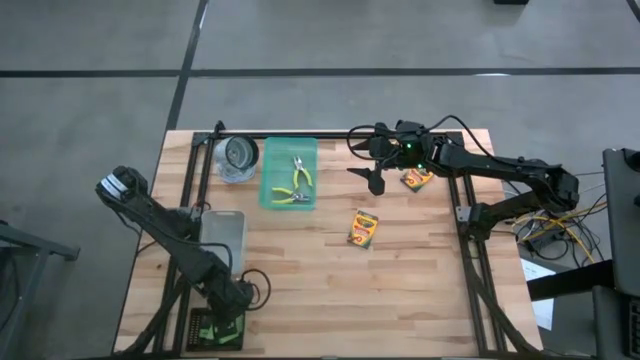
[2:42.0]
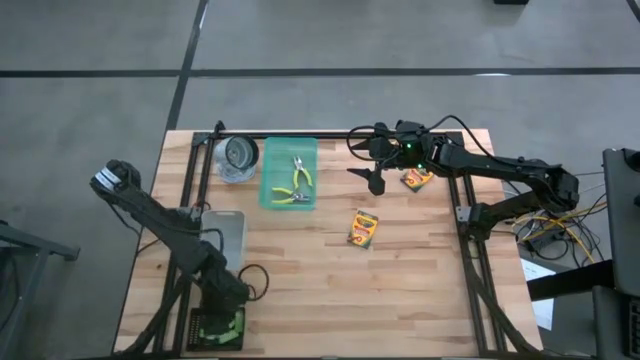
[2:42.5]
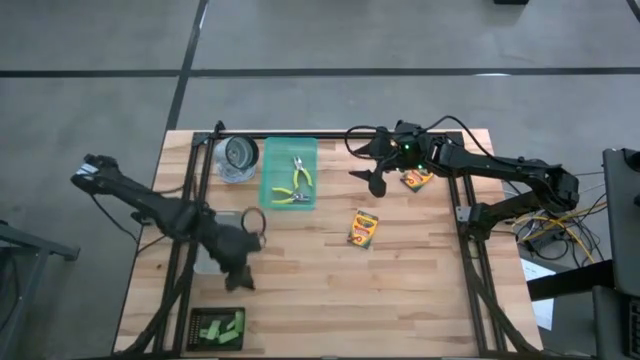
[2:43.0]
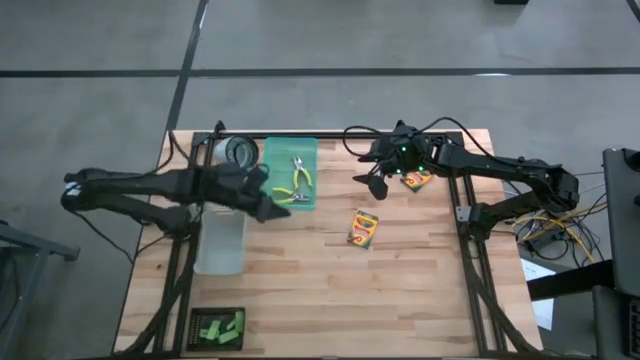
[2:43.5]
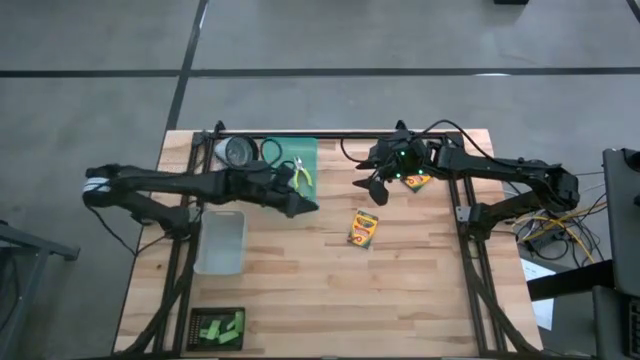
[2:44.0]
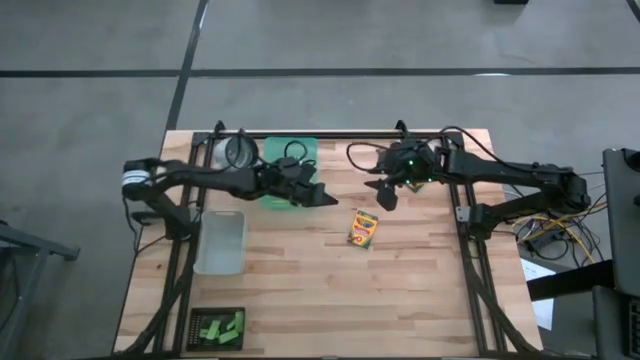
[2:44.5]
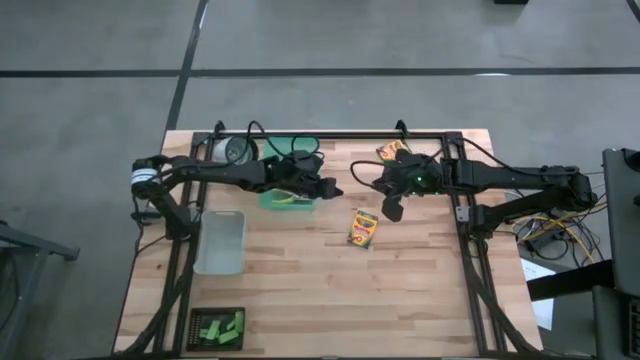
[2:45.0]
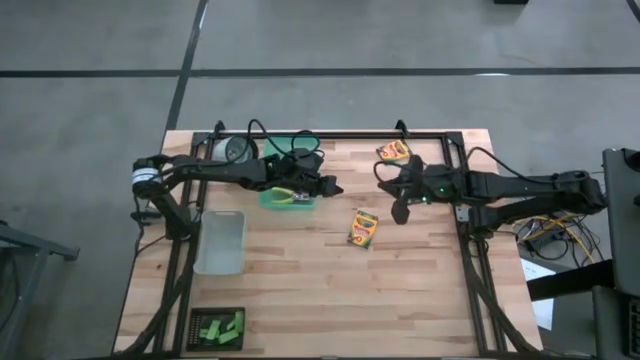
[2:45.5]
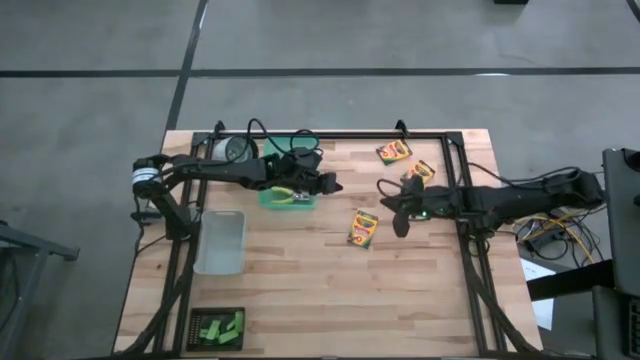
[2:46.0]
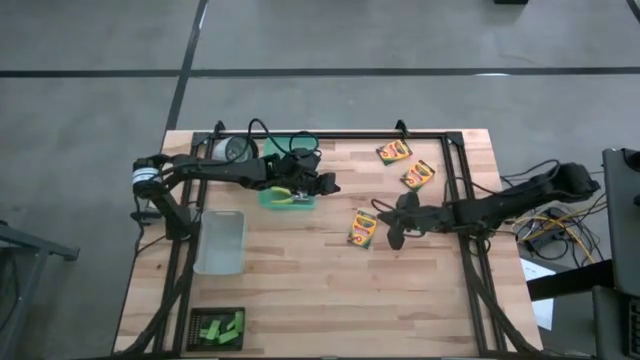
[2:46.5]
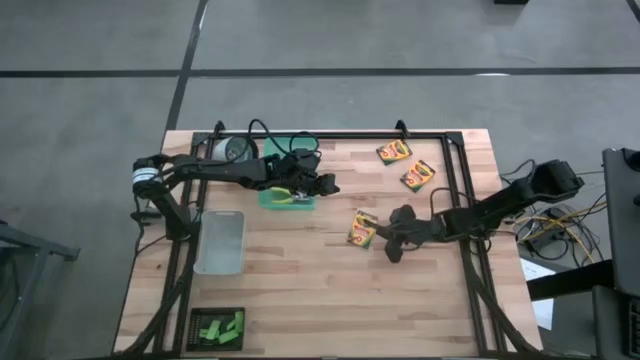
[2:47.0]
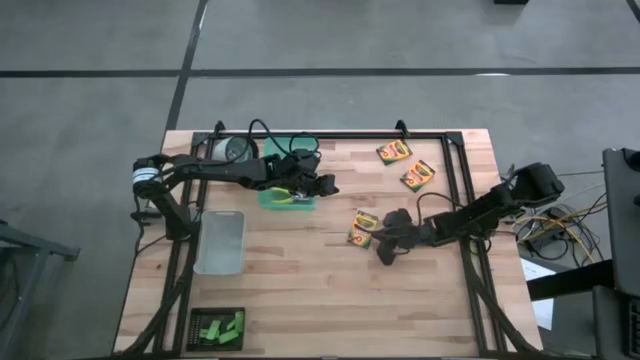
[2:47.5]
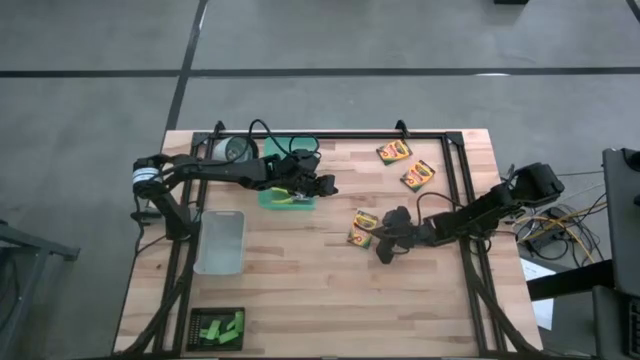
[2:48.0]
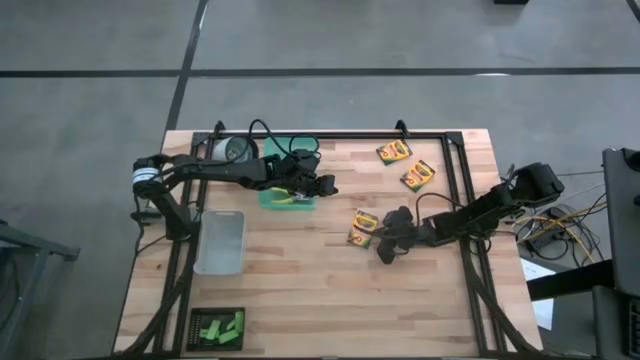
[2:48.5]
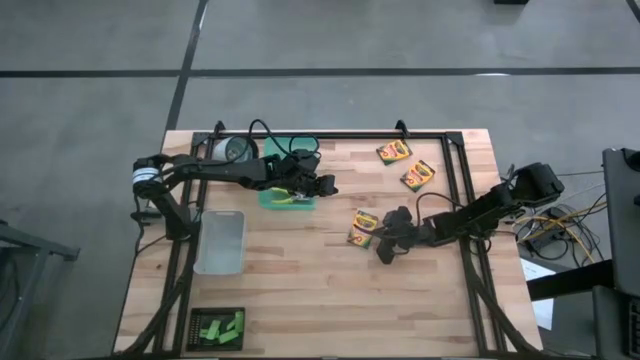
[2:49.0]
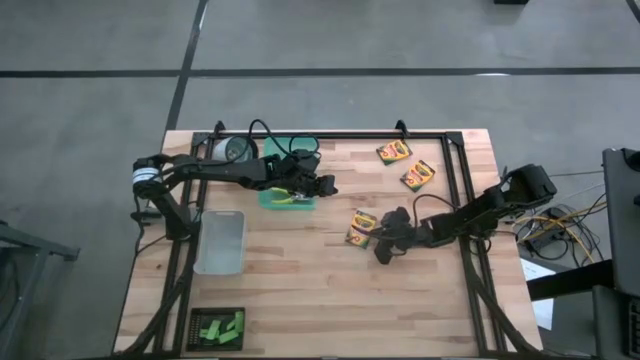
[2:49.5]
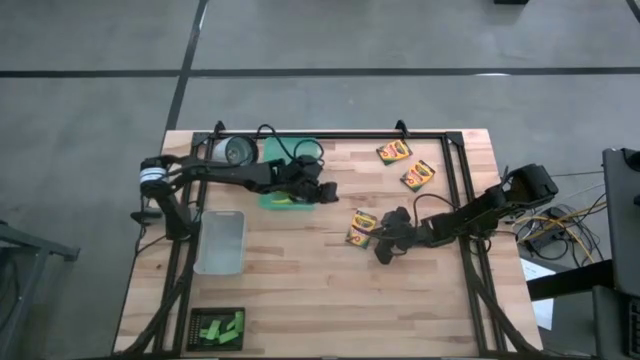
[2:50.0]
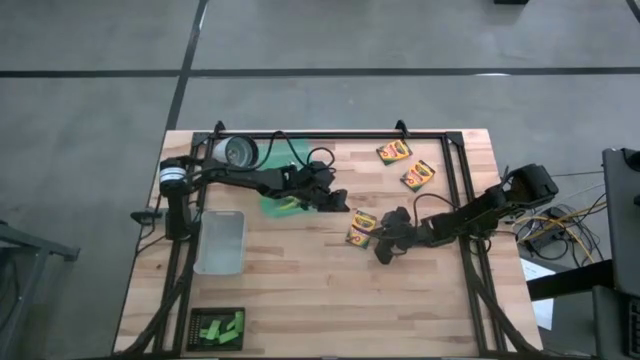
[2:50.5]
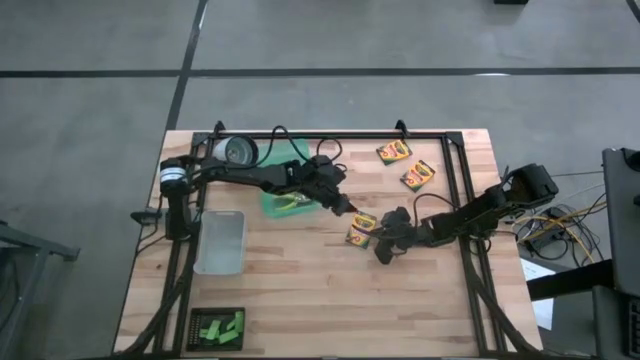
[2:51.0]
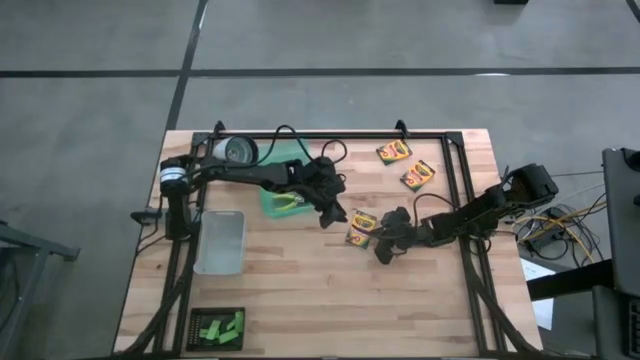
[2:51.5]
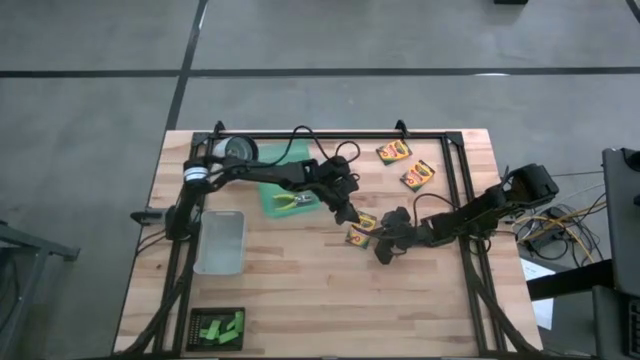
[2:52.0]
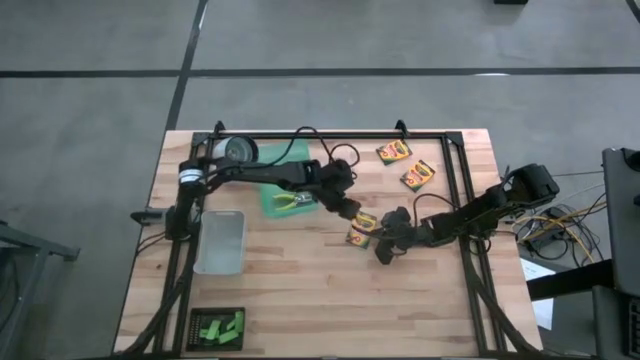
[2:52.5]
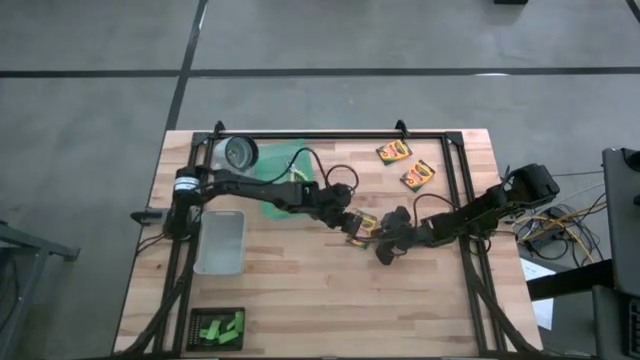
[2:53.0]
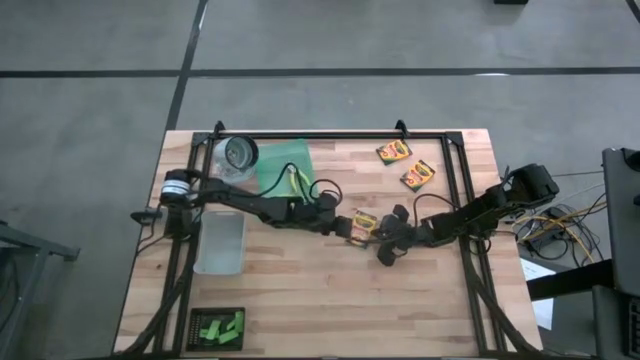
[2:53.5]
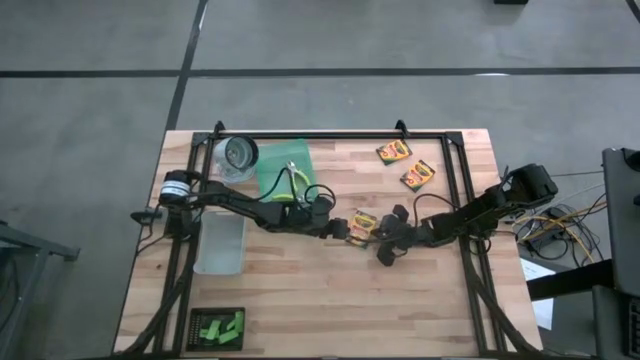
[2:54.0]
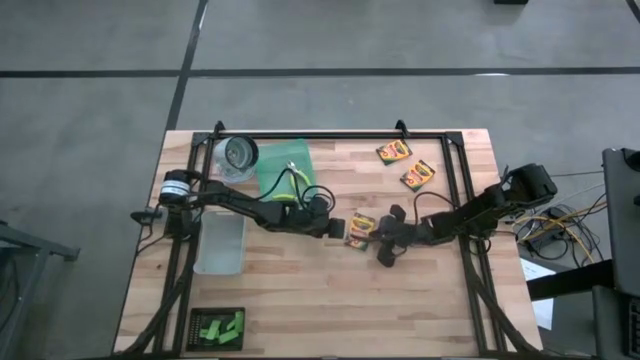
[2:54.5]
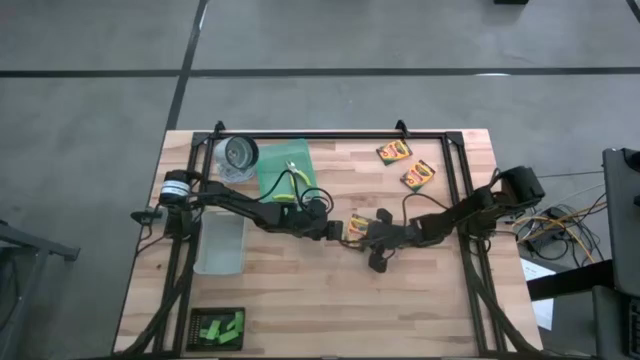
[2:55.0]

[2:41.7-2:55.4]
Task: Pick & Place School Supplies
Put the yellow crayon box into the gray bin

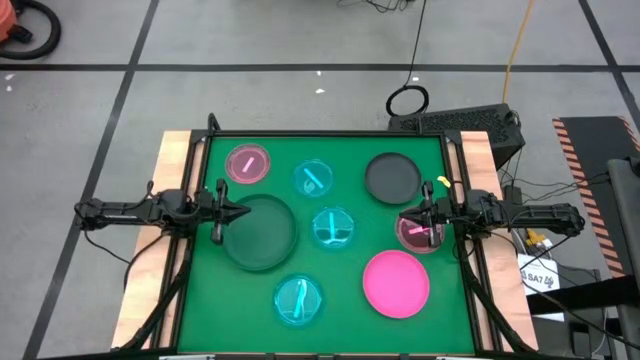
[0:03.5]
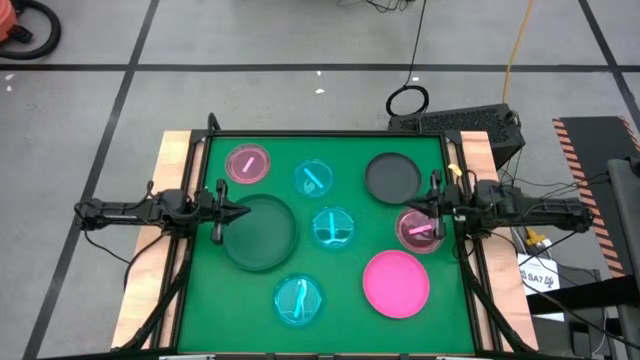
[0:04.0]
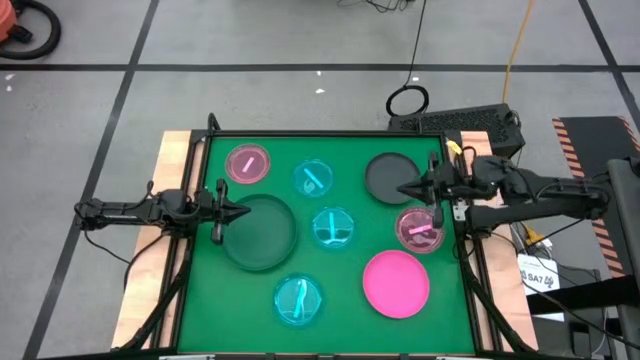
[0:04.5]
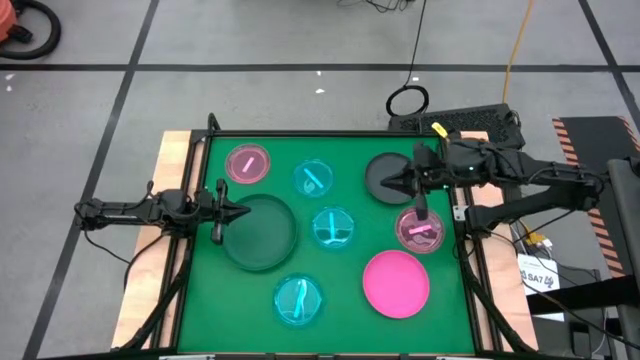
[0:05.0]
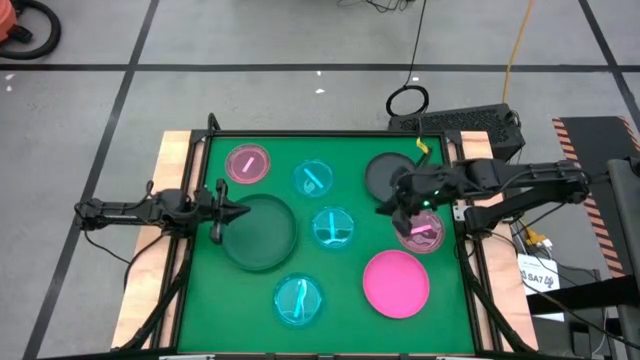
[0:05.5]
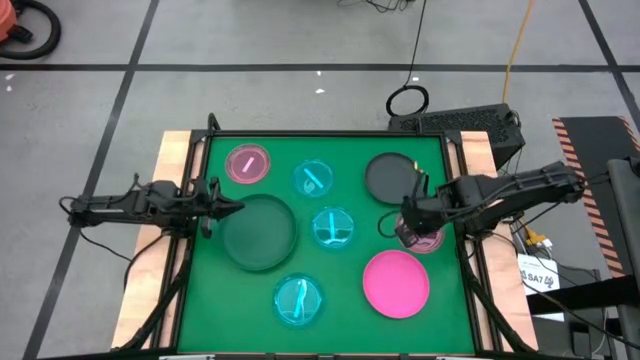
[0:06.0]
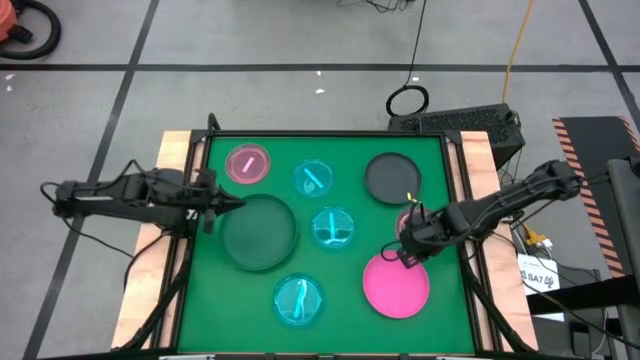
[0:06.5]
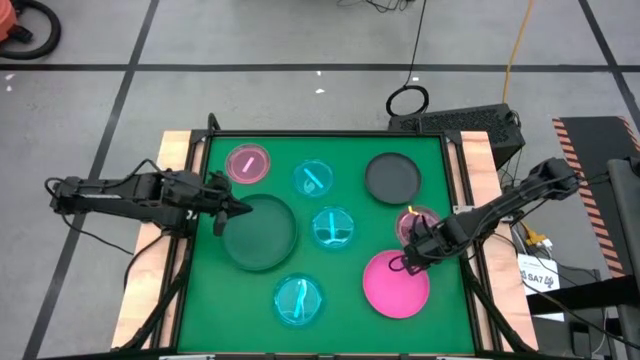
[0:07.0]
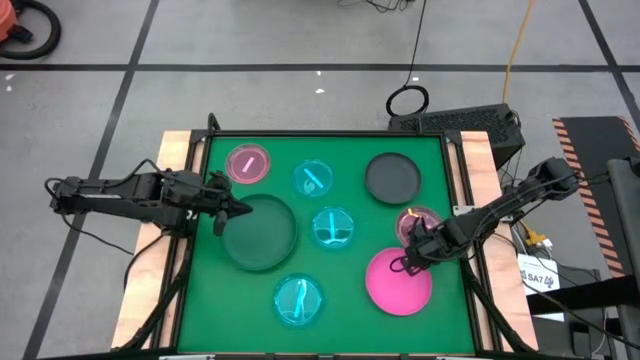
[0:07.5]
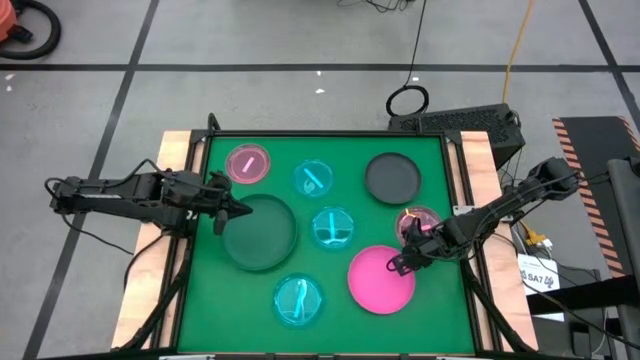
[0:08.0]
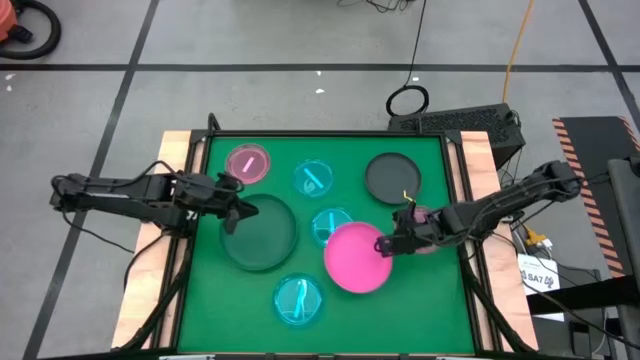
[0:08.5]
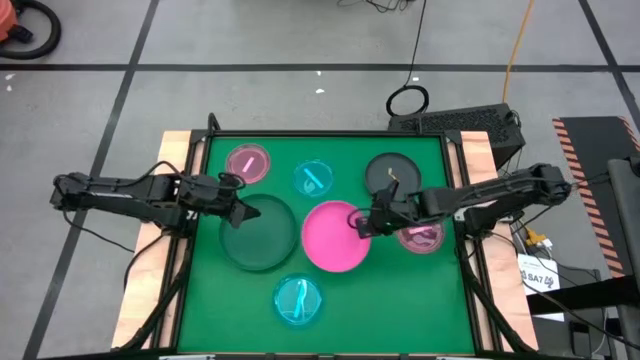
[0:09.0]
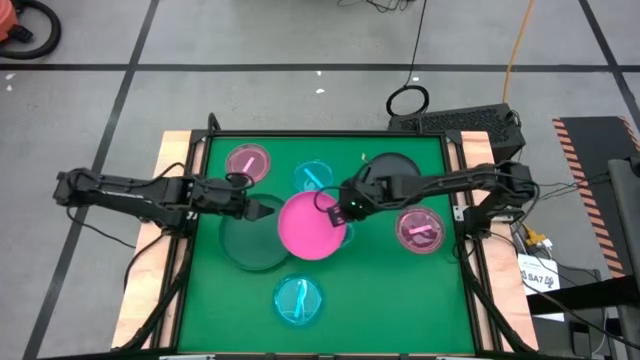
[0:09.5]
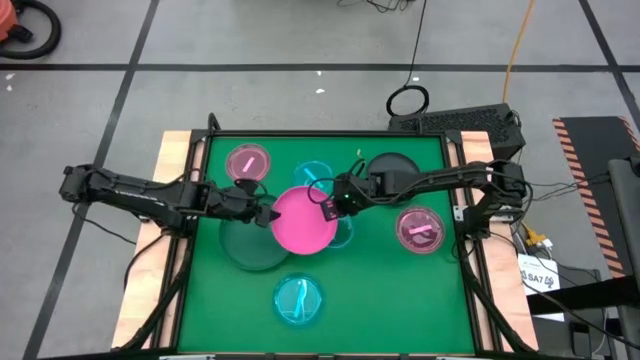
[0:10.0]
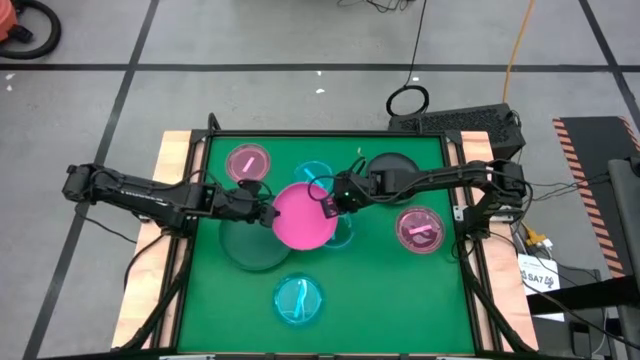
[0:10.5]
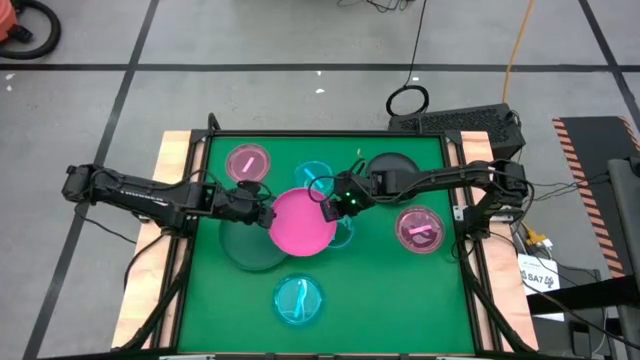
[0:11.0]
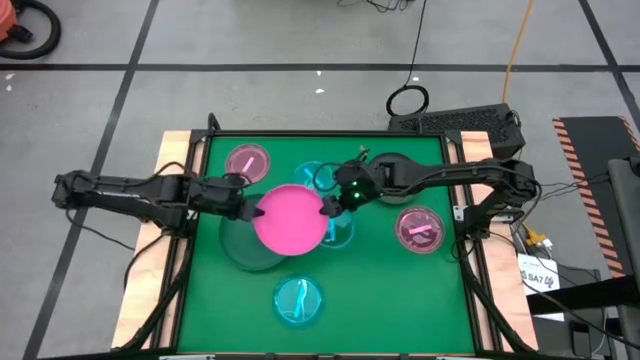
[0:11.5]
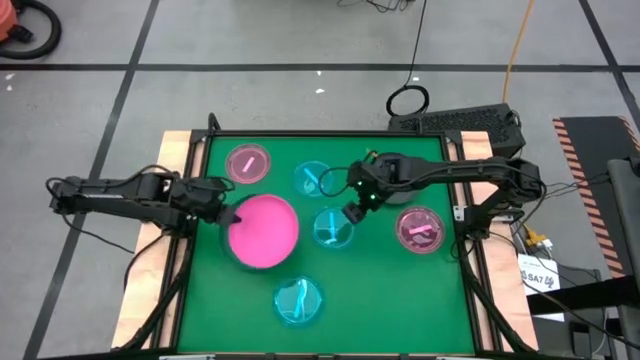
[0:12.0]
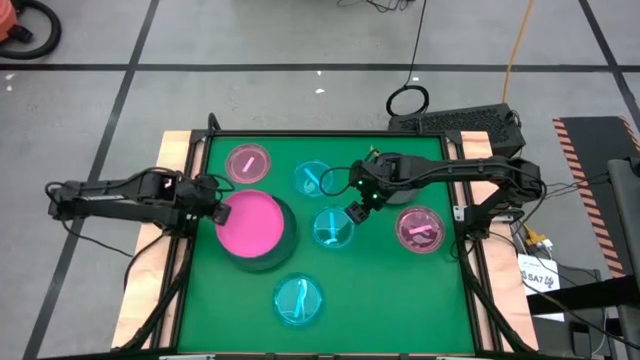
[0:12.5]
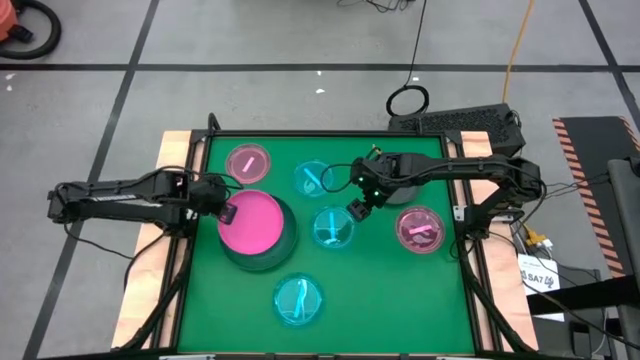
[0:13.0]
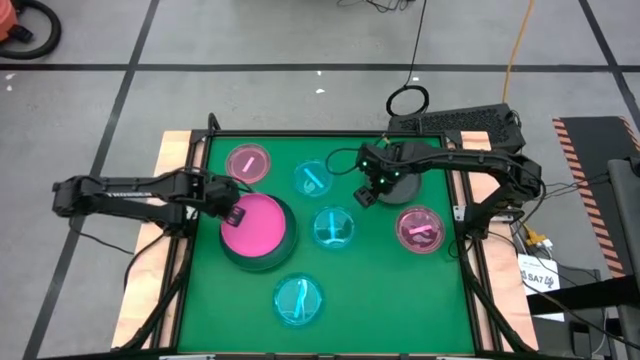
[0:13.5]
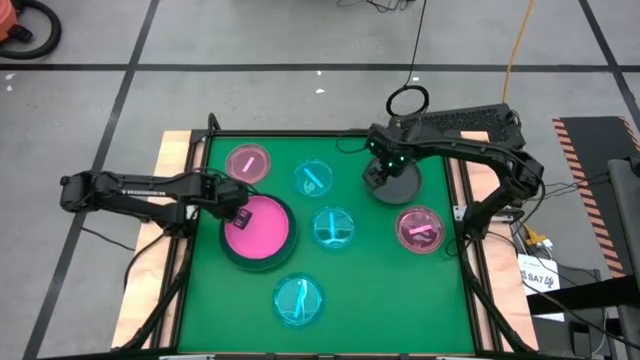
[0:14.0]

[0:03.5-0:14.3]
Task: Stack plastic plates
Stack the pink plate on top of the green plate
